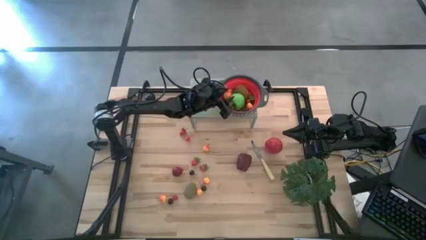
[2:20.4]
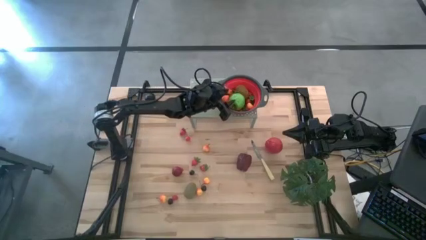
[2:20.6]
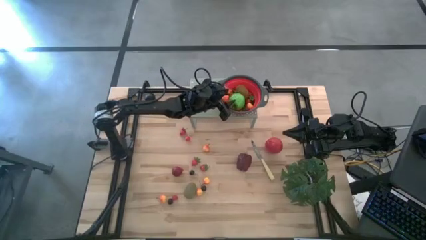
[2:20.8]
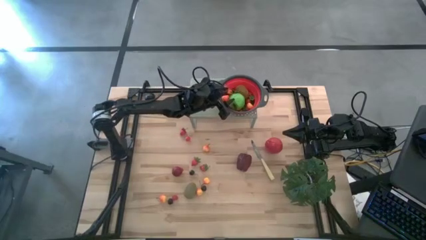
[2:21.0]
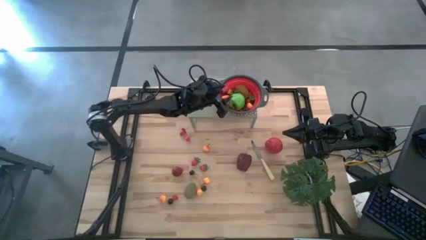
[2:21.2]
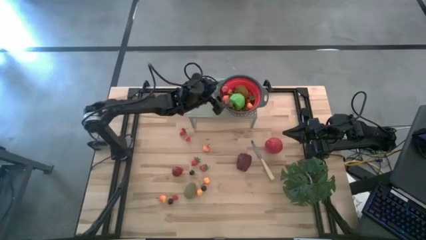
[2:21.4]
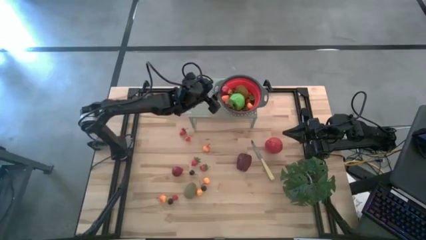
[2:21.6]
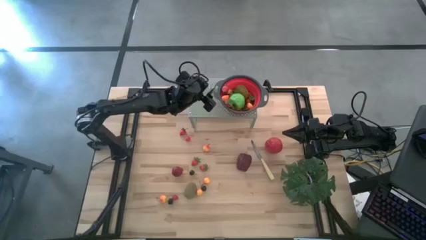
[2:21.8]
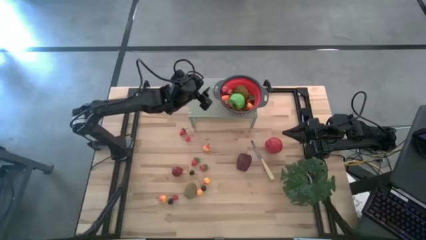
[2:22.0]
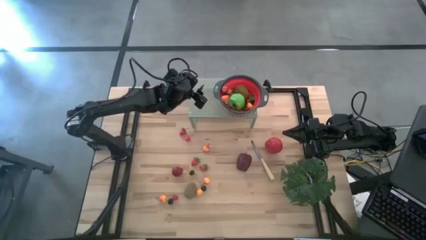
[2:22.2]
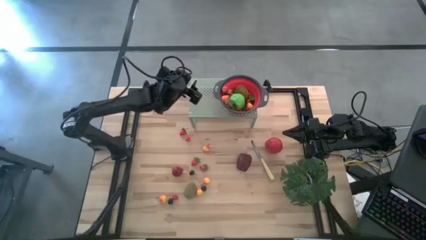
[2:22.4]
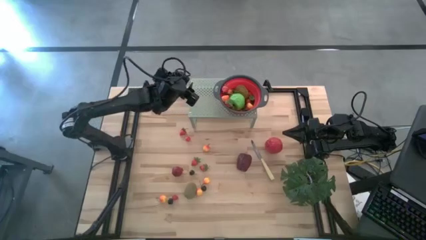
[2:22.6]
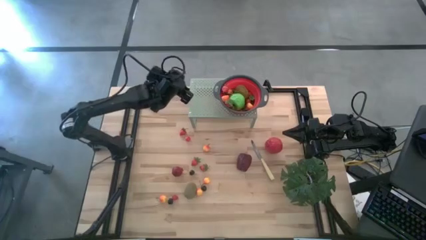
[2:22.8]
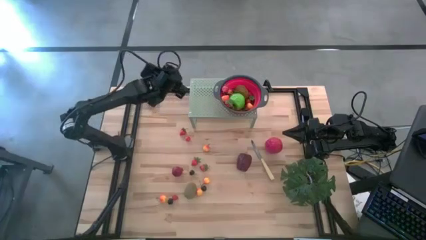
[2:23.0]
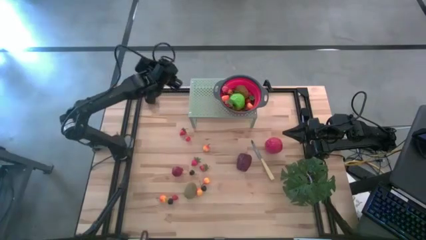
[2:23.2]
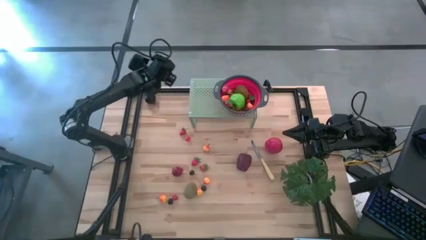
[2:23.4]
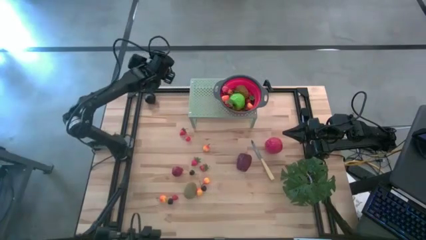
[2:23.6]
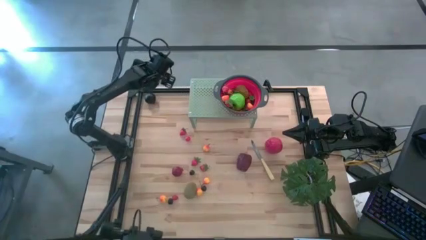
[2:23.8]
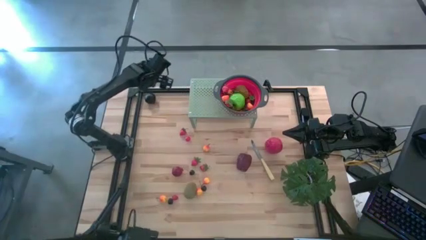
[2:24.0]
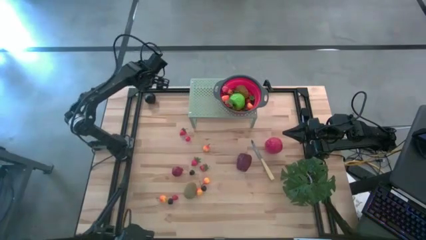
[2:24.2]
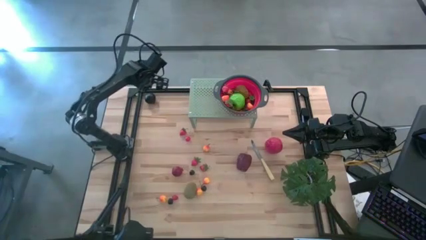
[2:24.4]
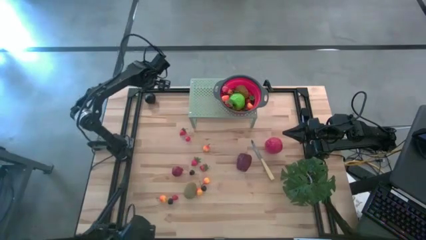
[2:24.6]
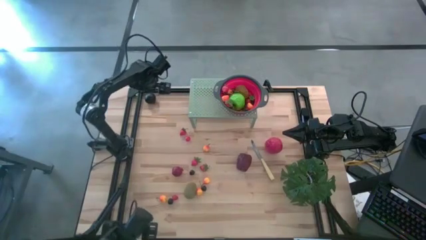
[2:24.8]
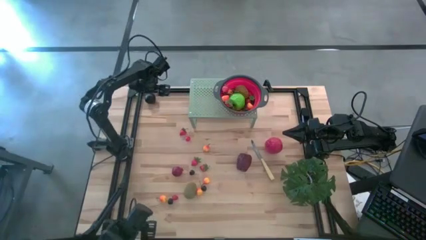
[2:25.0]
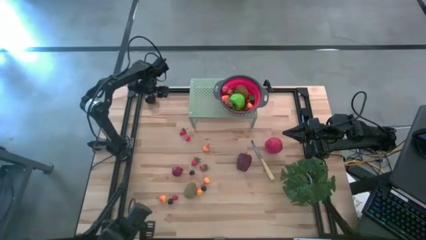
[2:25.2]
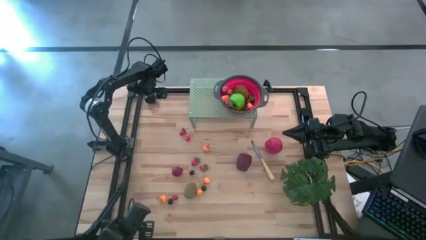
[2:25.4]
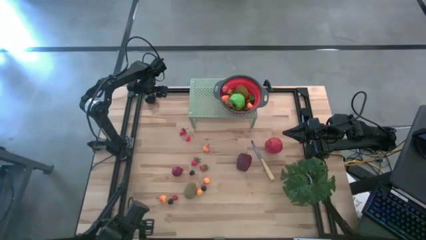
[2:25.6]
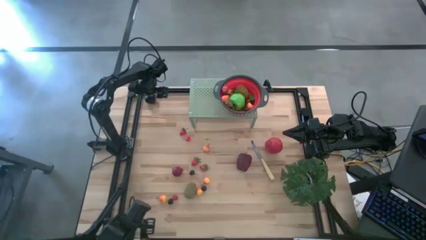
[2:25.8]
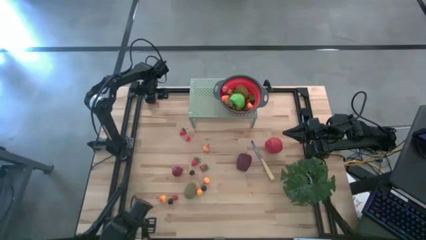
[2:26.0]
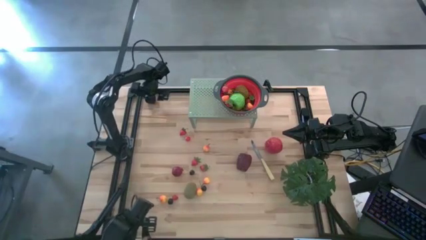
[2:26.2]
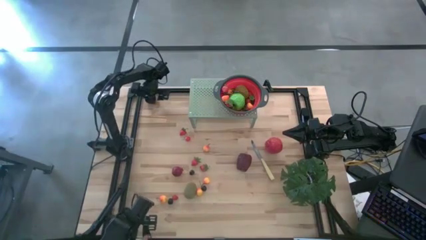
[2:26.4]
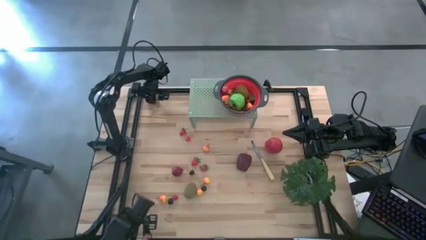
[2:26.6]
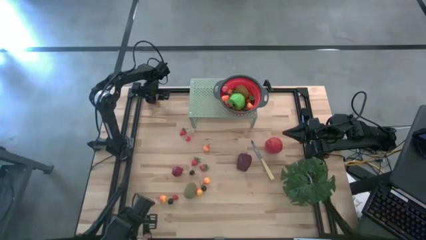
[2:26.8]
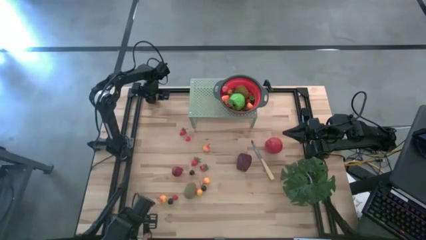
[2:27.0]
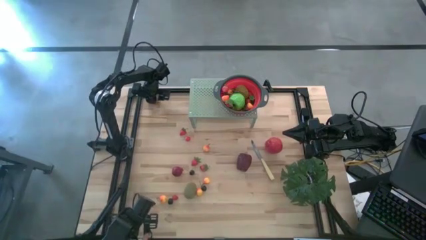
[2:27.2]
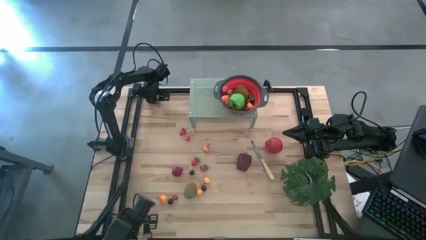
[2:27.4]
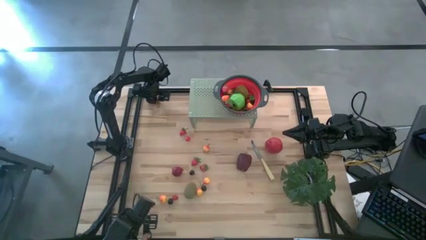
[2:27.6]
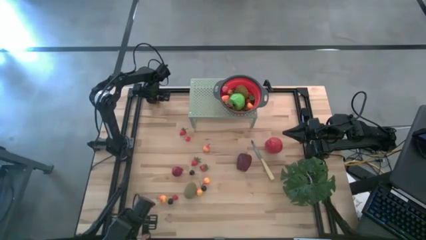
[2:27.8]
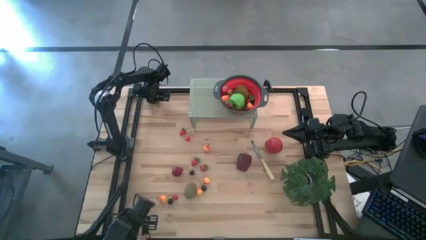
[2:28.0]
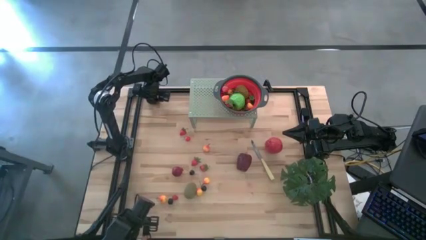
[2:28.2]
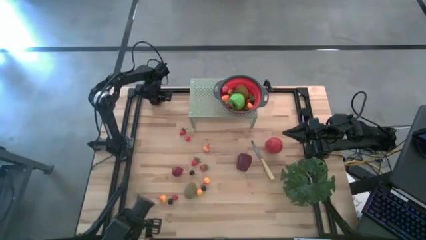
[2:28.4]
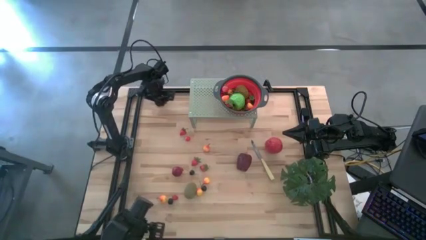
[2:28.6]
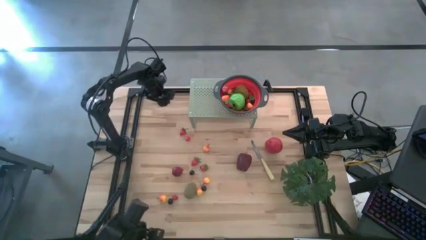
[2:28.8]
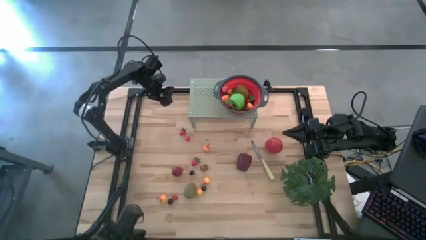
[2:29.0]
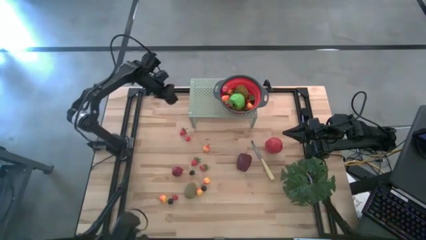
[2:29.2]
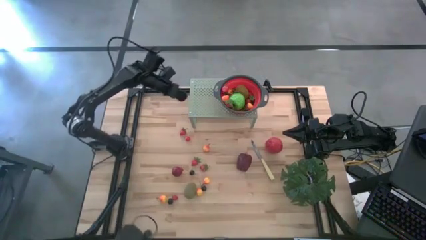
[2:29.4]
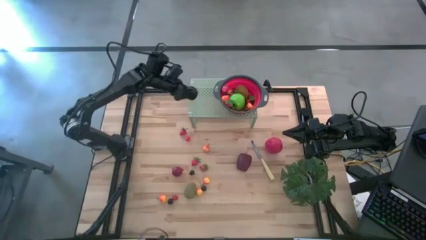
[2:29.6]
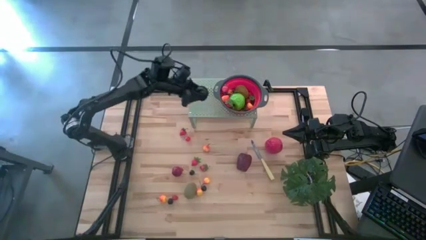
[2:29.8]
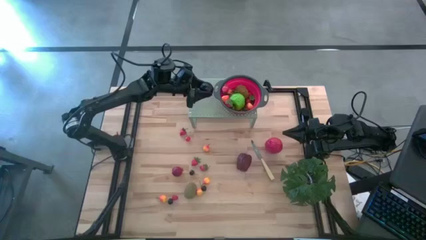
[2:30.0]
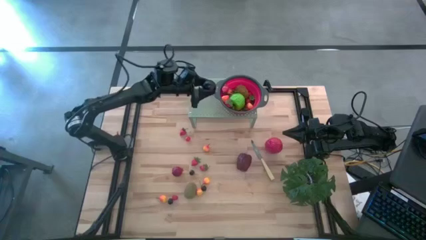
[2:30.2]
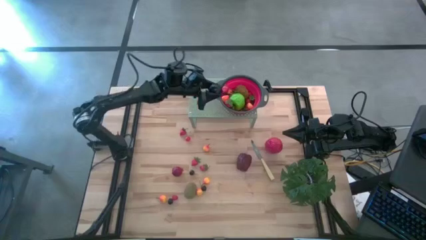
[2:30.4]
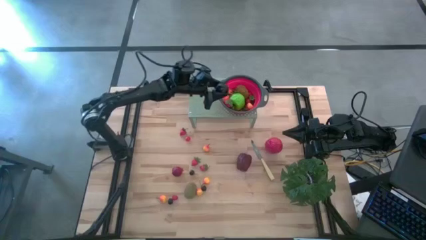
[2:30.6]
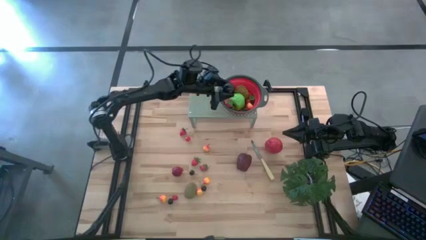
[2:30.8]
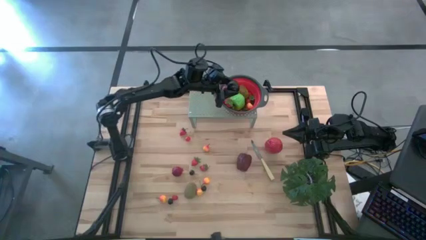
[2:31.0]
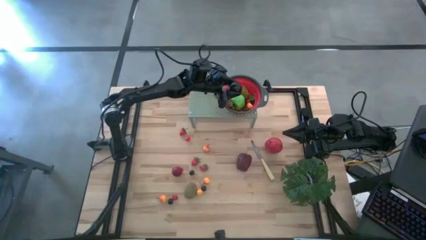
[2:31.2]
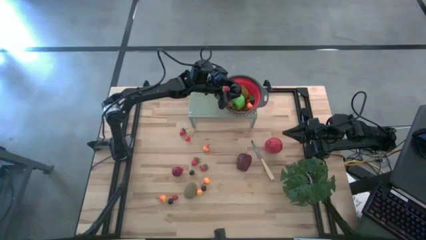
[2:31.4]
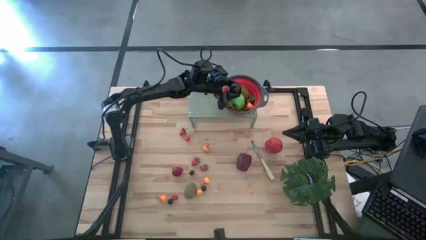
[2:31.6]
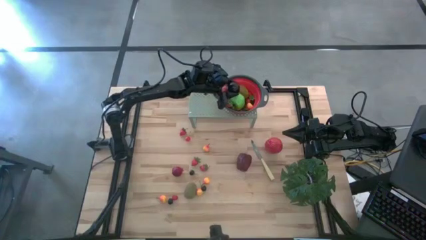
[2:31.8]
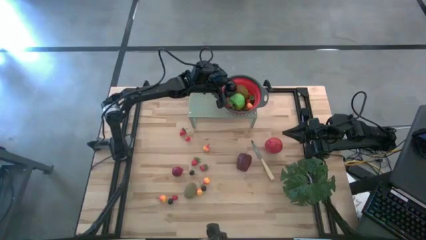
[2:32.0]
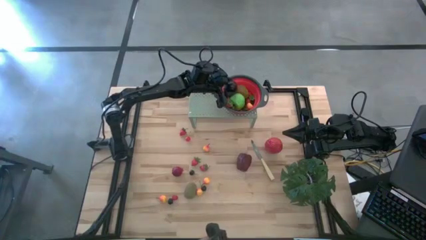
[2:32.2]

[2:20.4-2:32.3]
Task: Pick & Place Fruit
Put the black plum into the black strainer bowl on the shelf
